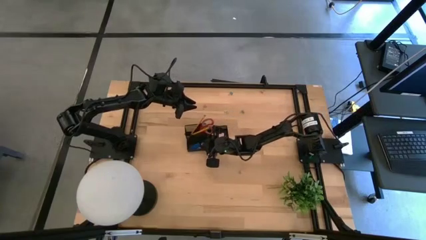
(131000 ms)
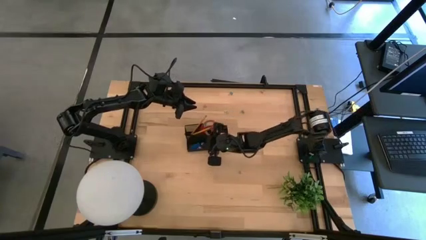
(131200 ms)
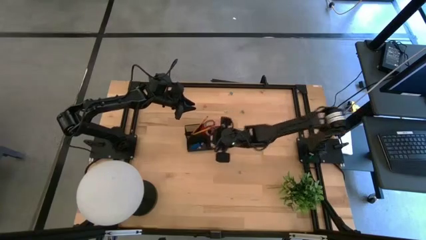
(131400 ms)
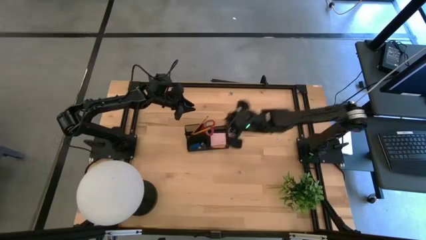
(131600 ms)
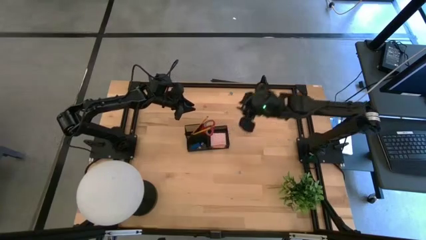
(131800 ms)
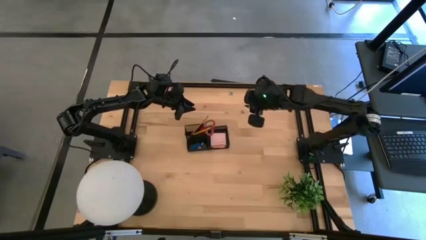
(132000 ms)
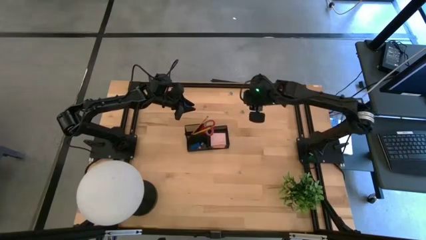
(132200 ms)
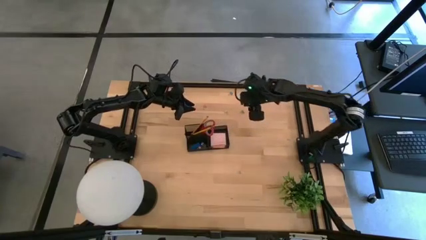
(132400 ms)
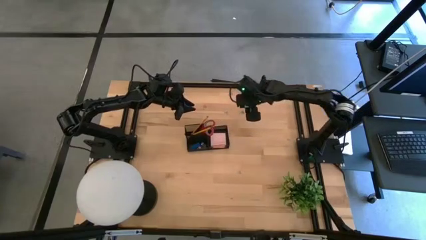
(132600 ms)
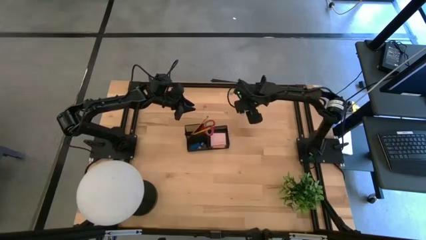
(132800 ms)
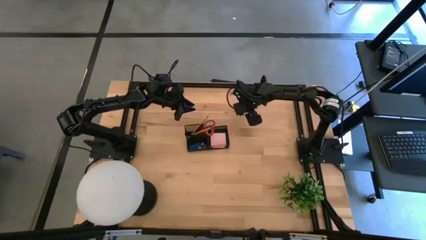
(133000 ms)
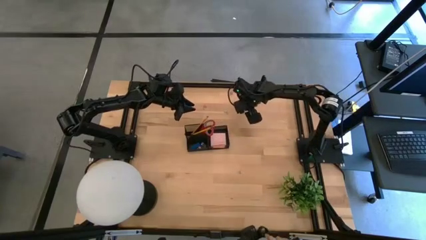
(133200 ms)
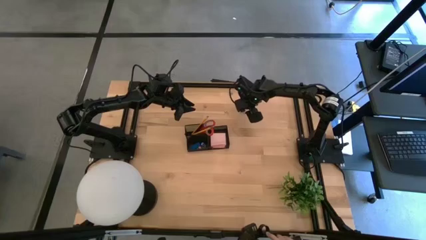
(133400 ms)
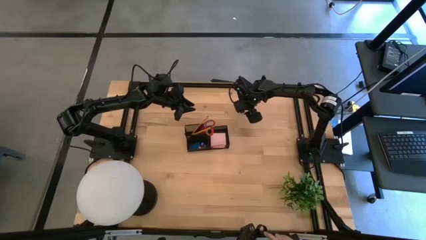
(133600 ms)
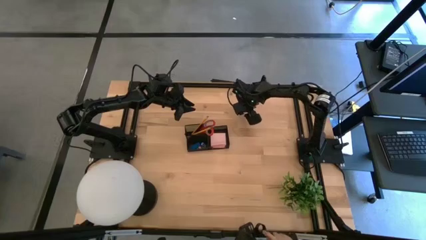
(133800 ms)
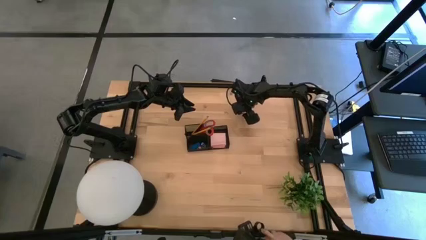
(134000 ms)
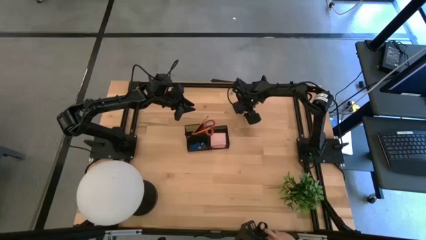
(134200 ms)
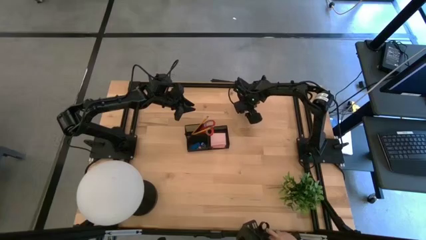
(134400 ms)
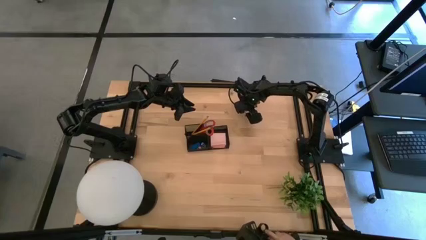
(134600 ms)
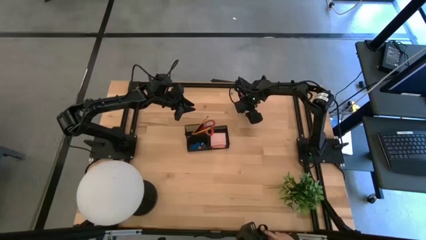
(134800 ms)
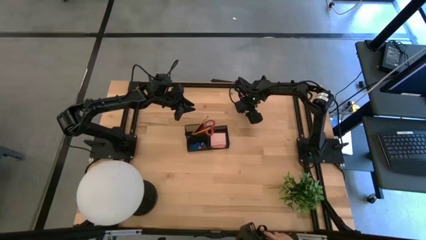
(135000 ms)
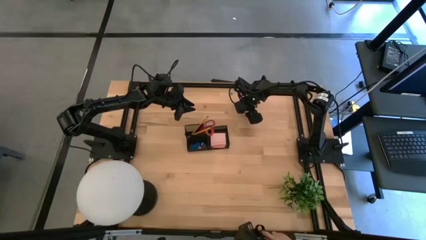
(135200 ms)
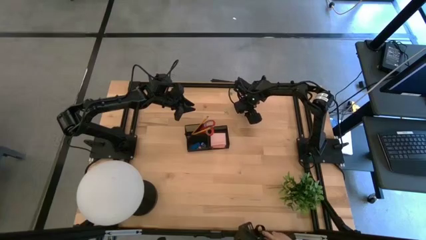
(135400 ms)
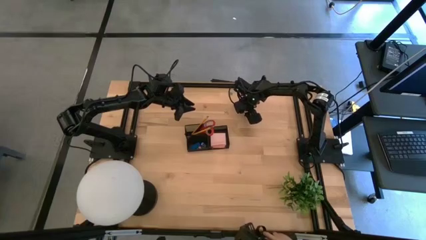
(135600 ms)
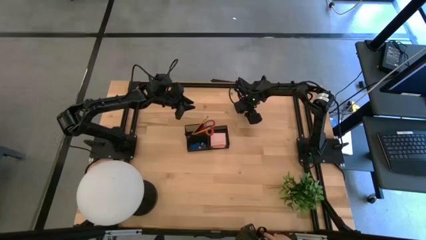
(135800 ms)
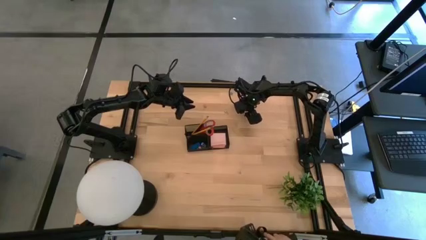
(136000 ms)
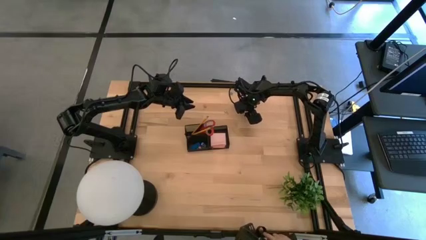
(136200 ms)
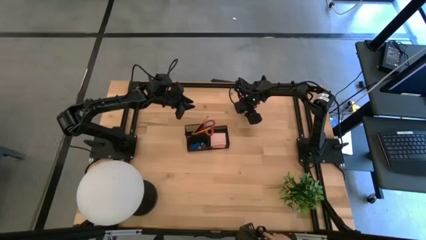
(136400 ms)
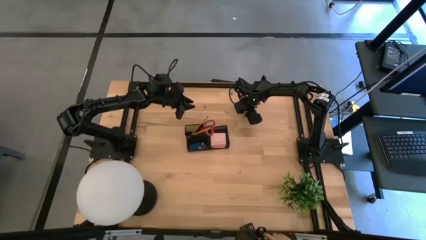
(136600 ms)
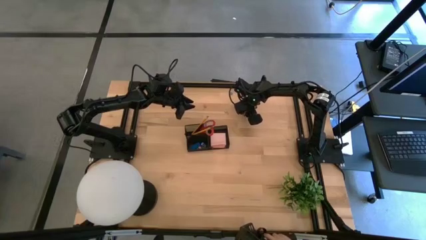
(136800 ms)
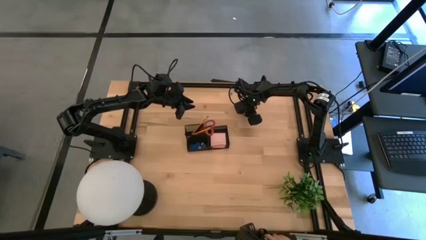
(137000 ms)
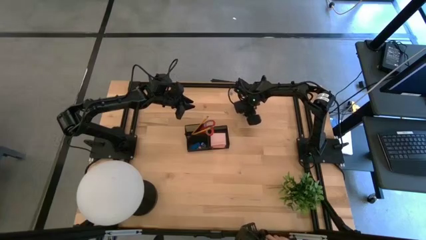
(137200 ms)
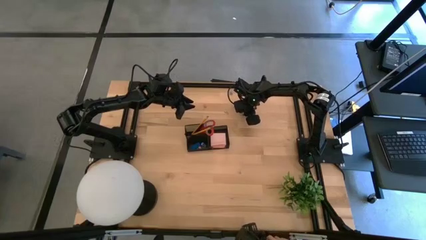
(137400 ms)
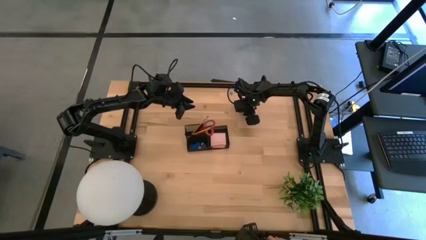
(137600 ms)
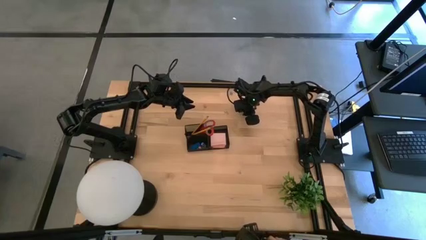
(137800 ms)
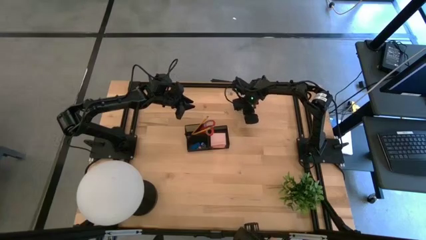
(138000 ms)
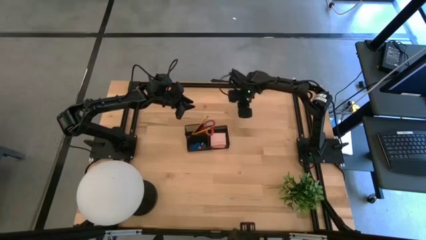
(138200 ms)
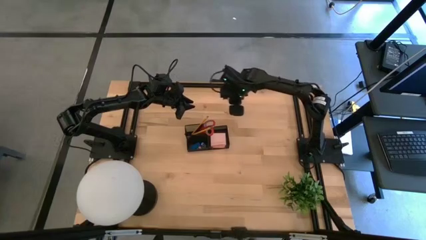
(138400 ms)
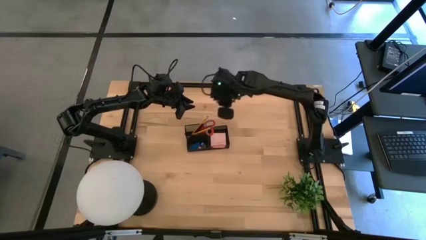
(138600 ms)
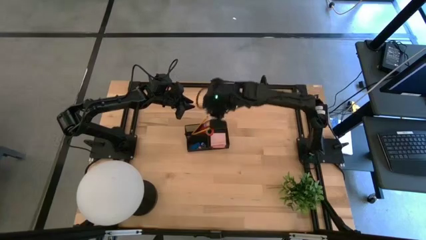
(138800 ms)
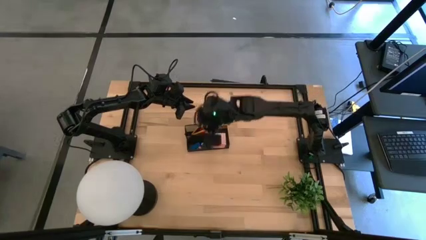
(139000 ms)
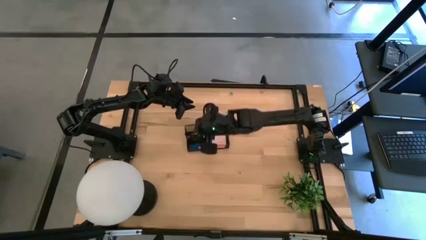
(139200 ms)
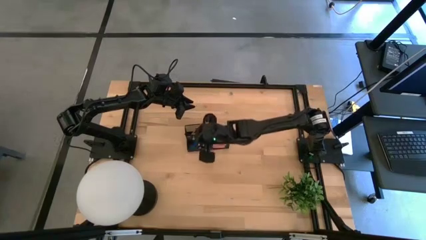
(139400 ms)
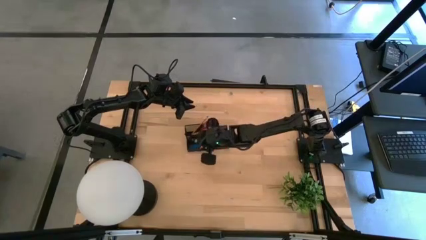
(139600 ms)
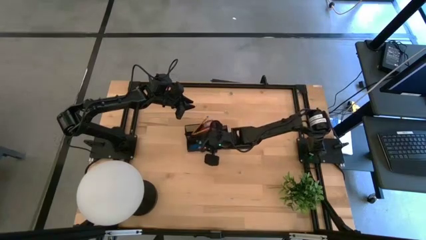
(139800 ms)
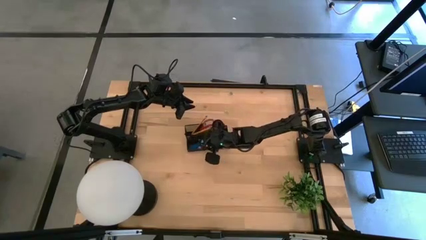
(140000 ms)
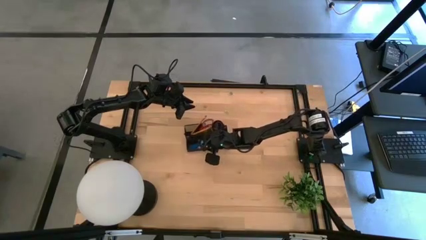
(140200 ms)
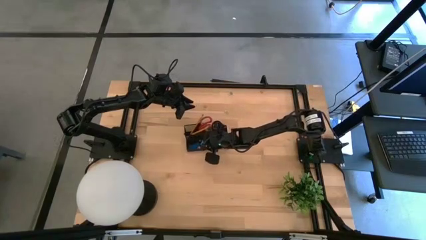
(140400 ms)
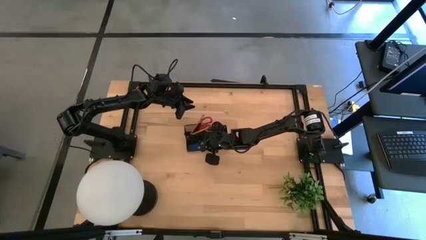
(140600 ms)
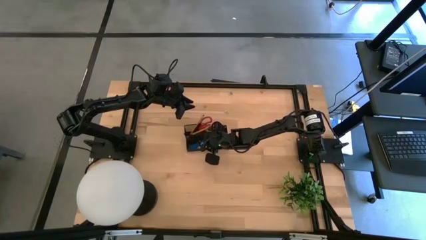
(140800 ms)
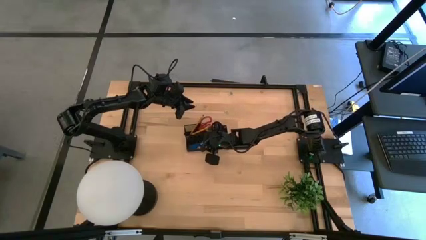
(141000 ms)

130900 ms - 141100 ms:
Task: Pick and place office supplies into organizer
Put the light blue binder clip into the desk organizer

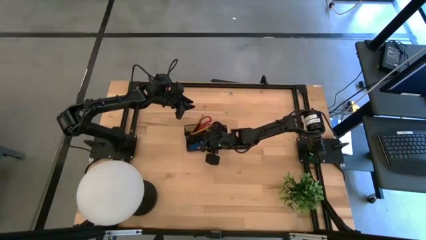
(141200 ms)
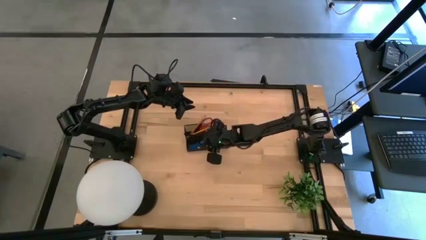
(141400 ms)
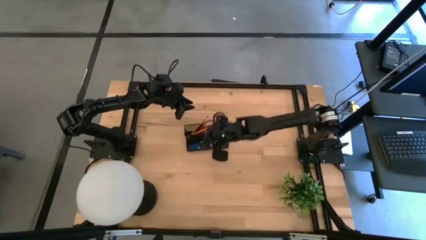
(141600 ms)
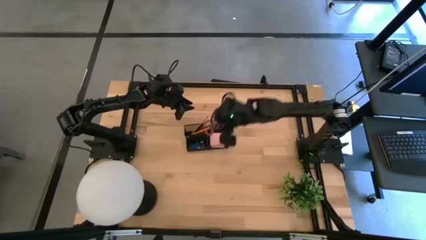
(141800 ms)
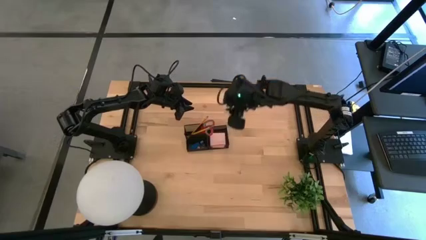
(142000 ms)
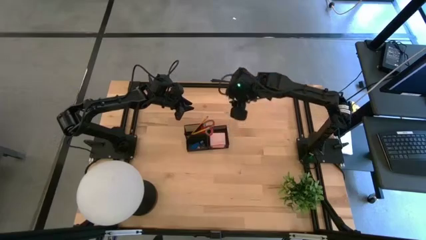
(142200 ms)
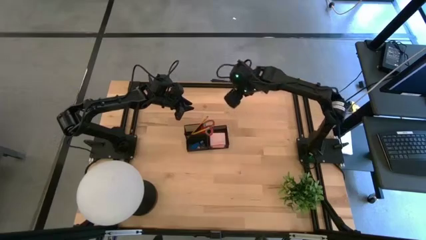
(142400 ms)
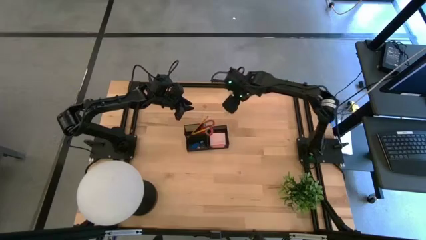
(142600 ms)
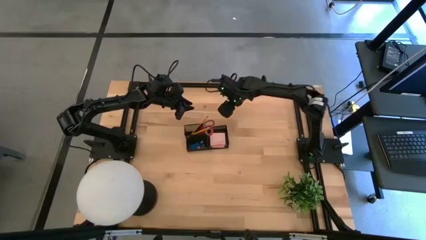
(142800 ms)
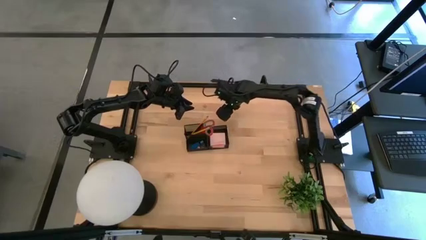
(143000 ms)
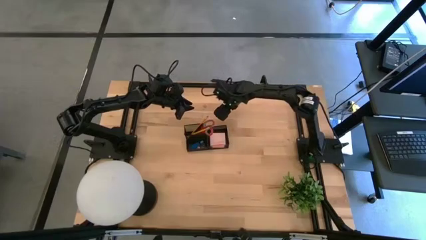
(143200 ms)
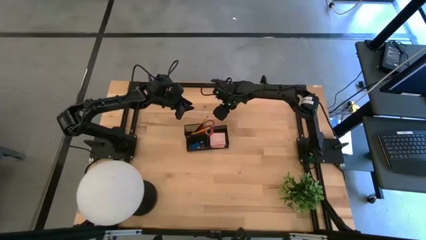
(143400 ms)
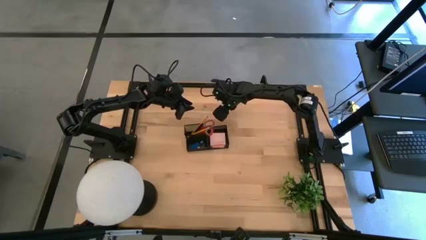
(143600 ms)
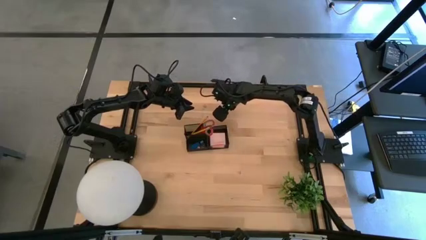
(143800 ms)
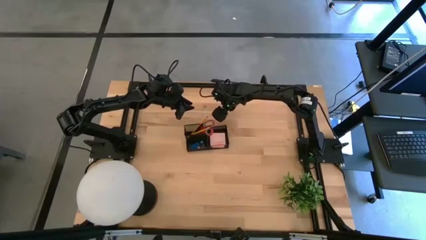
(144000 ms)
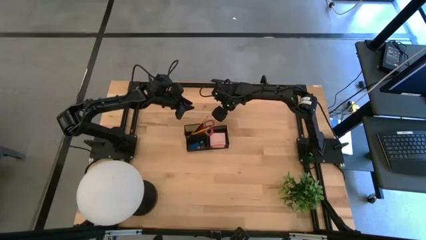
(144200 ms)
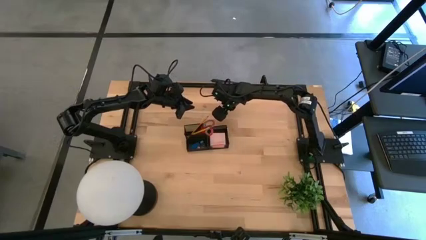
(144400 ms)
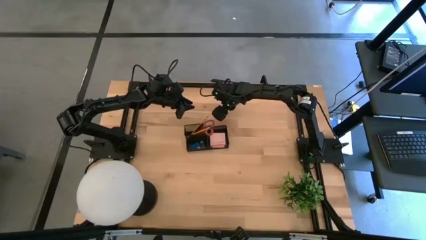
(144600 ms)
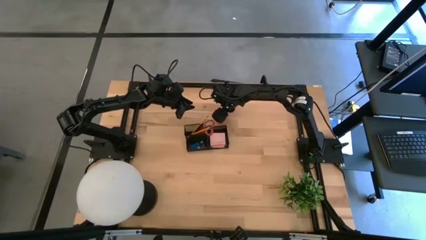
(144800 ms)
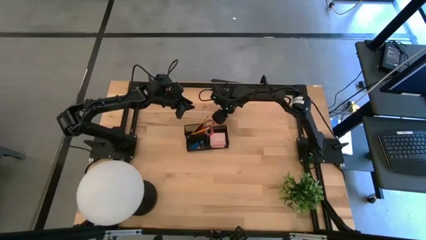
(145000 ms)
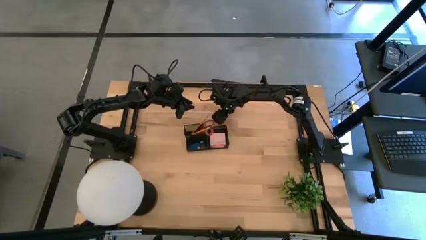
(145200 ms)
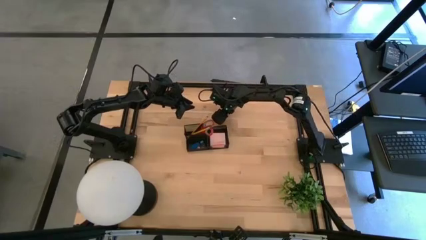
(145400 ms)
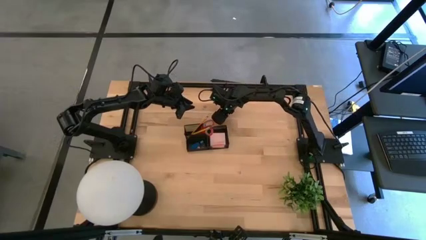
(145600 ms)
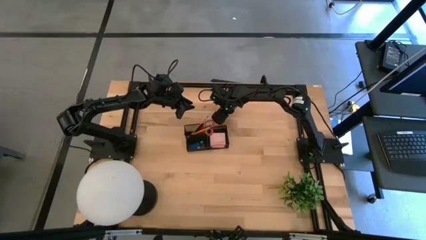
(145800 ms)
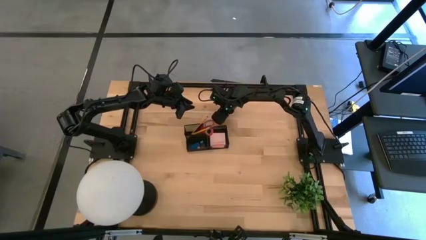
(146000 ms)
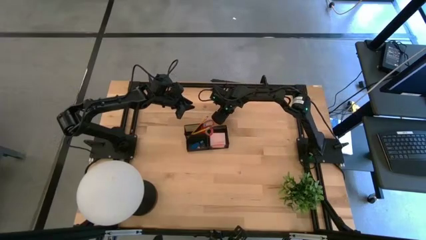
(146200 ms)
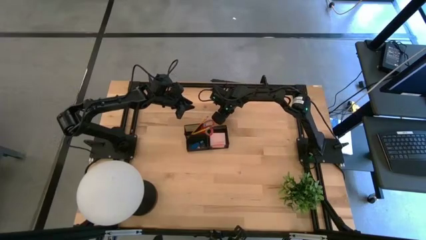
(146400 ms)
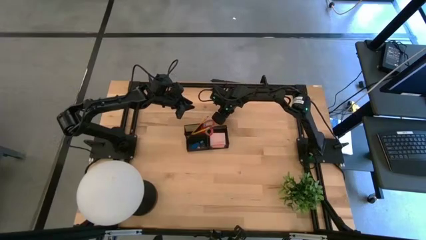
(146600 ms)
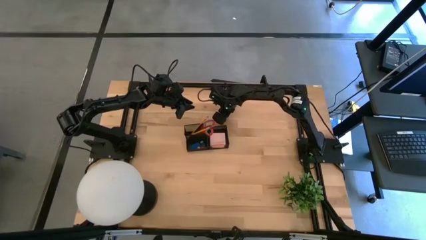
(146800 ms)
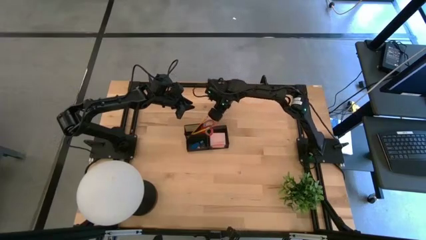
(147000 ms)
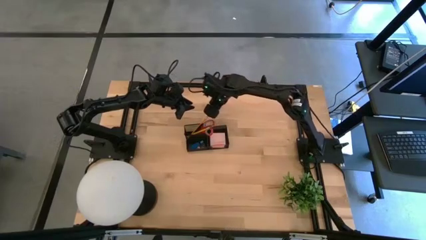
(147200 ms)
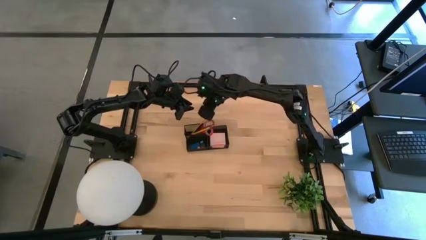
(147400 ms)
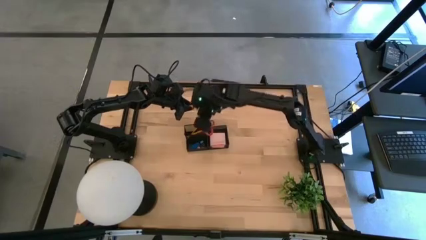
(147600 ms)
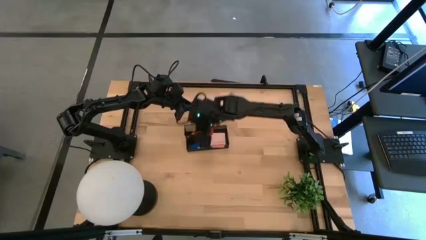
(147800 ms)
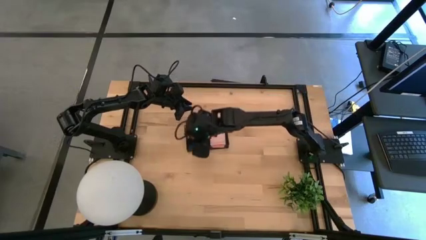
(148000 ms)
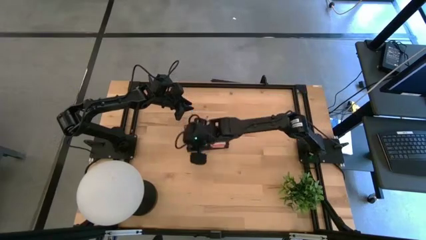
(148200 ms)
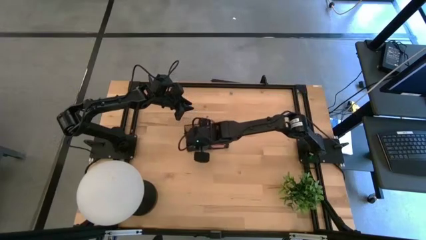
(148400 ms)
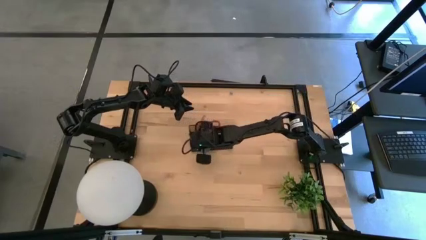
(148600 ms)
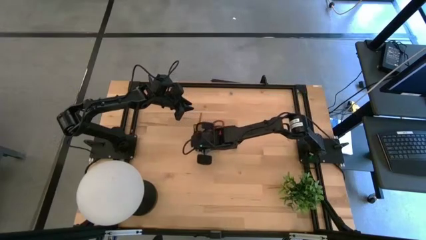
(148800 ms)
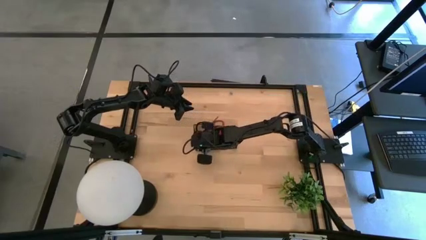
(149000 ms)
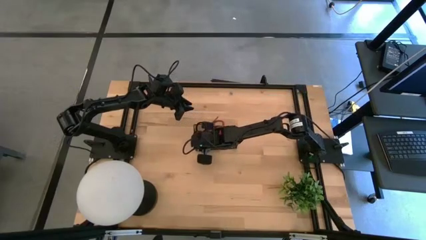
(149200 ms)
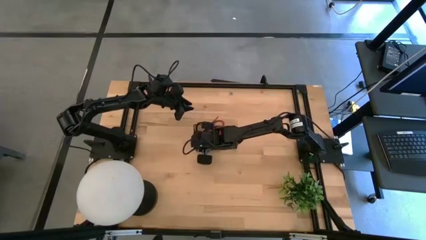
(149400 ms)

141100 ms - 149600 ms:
Put the yellow binder clip into the desk organizer
